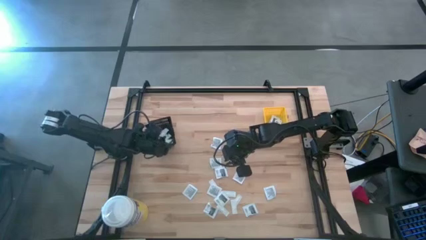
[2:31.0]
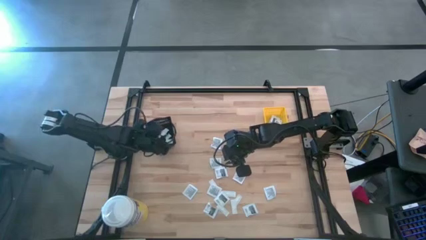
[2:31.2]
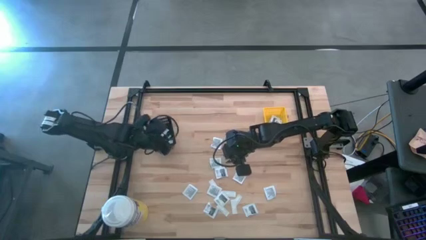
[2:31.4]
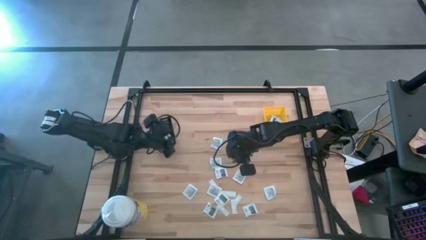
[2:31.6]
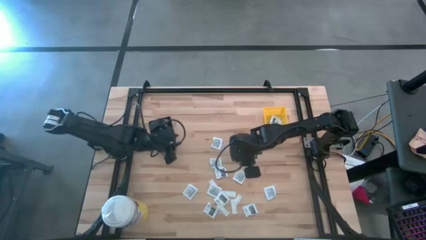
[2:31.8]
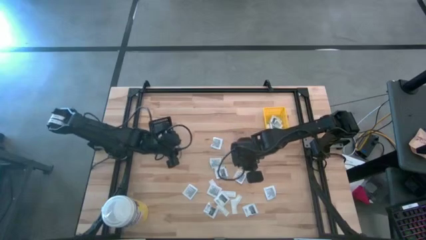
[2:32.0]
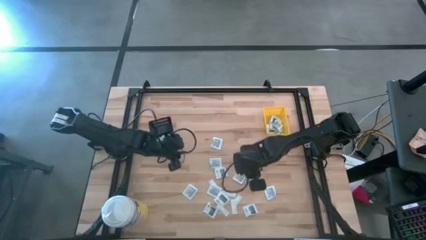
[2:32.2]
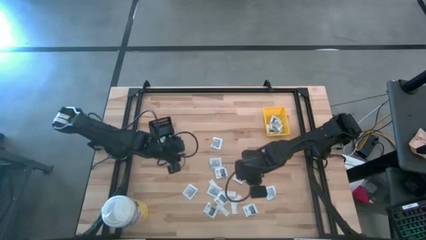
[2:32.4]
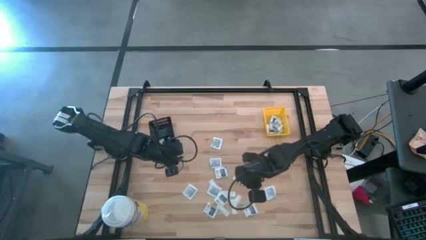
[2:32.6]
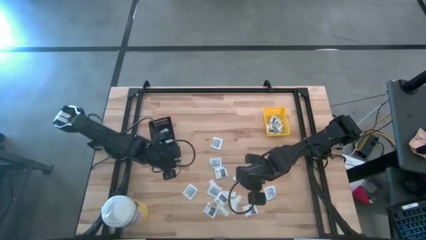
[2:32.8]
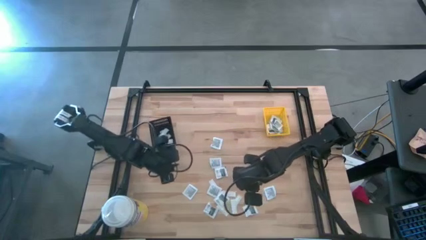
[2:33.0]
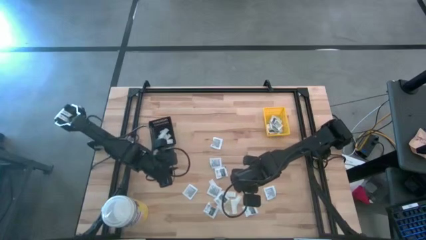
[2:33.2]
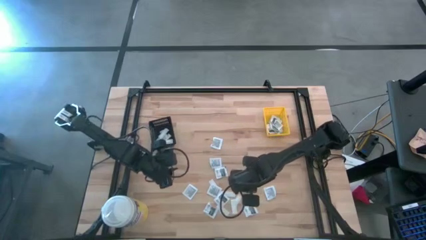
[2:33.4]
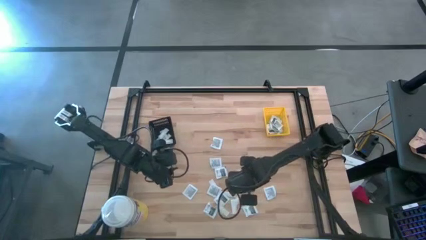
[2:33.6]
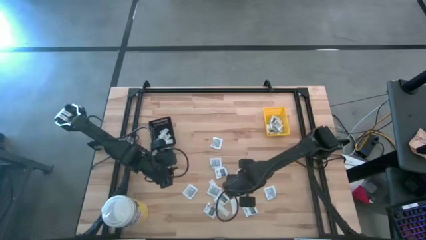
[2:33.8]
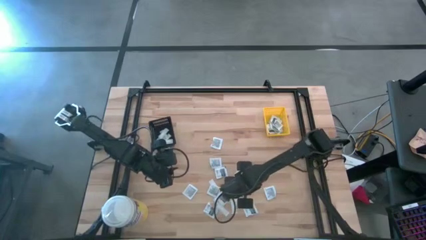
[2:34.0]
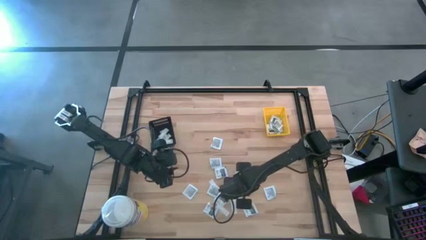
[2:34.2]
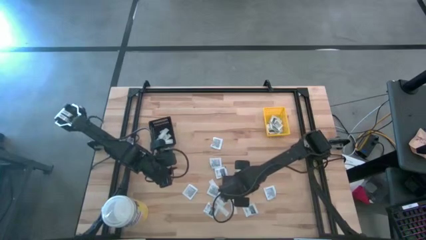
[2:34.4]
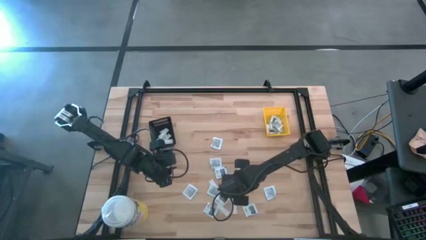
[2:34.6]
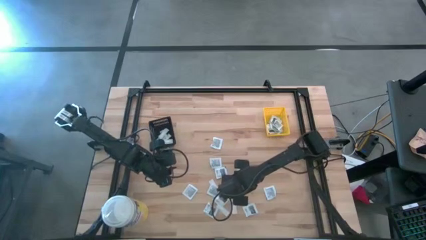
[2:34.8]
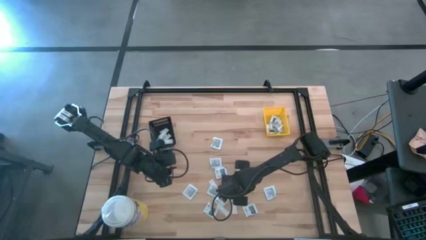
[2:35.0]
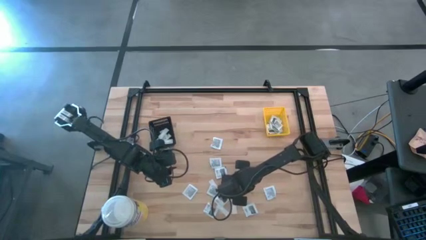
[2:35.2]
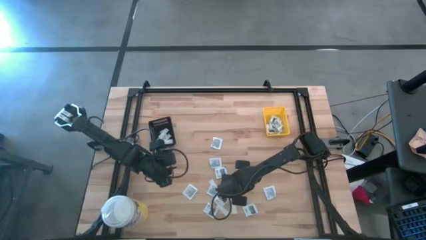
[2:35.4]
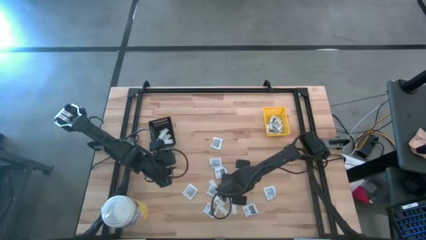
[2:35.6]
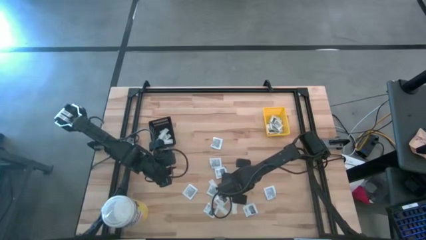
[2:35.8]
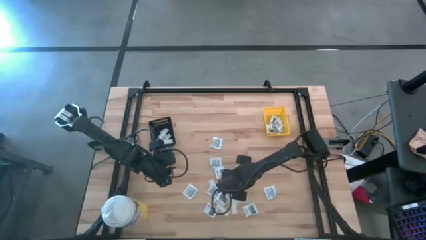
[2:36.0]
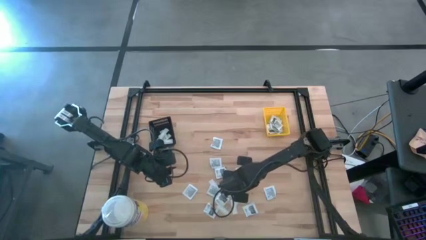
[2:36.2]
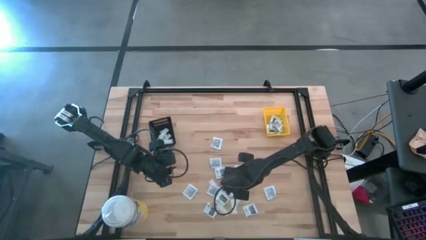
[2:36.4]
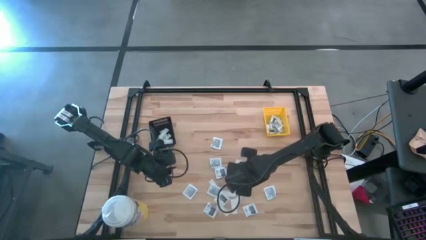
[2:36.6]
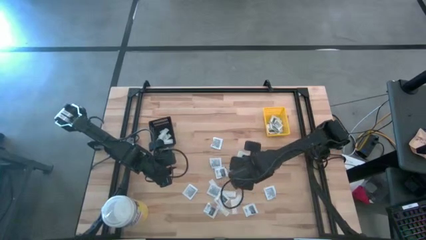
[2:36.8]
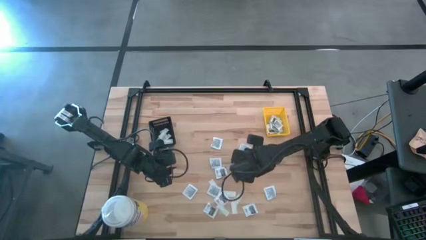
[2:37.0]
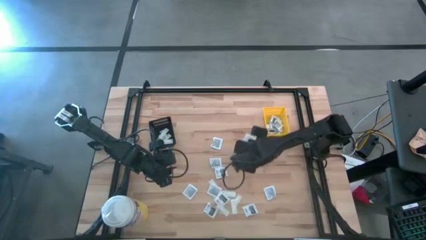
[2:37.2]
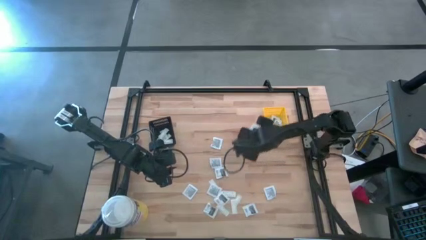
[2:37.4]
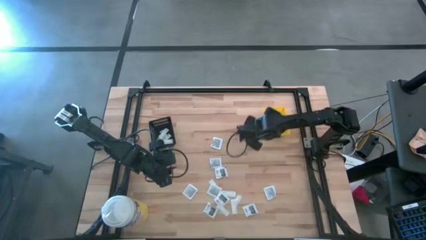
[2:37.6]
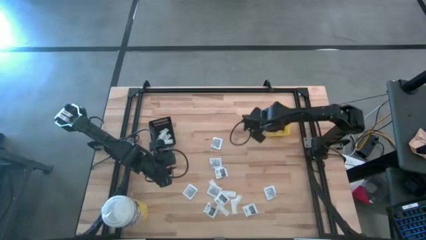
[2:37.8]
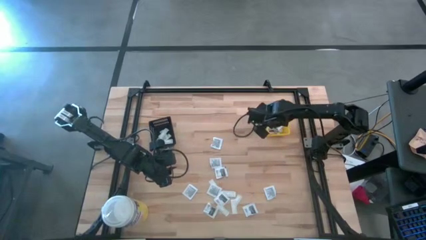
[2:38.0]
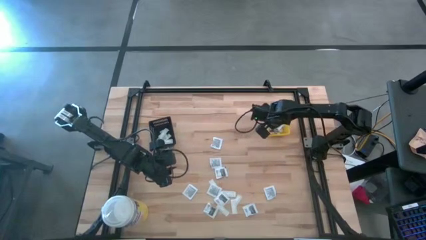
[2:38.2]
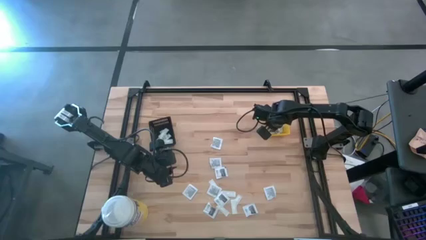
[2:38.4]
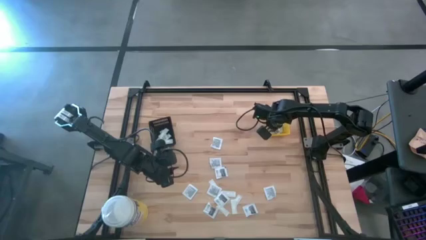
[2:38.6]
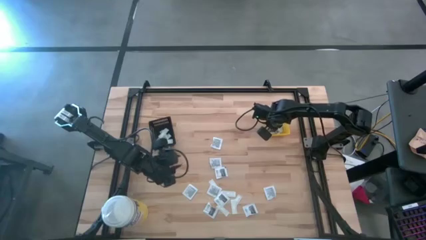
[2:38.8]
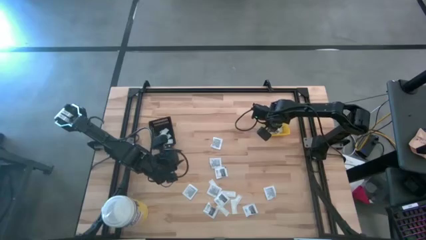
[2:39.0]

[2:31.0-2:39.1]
Task: Pick & Place First Aid Supplies
Put the black pad into the yellow bin

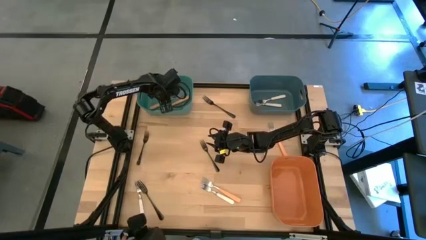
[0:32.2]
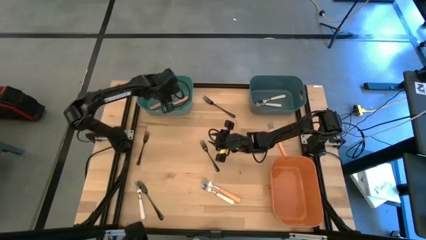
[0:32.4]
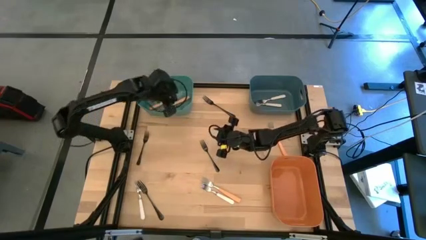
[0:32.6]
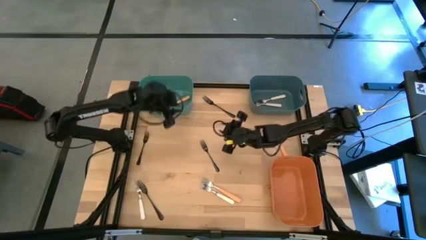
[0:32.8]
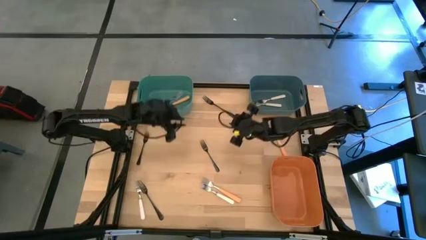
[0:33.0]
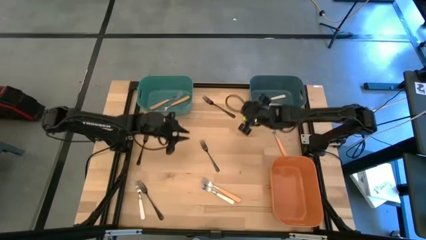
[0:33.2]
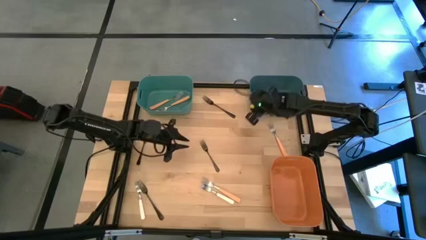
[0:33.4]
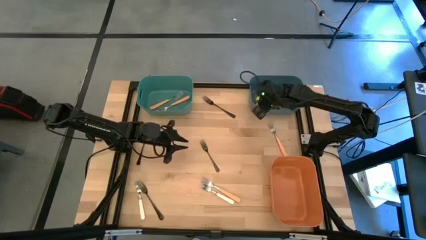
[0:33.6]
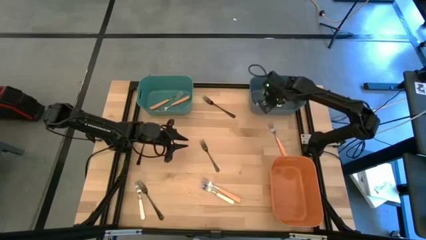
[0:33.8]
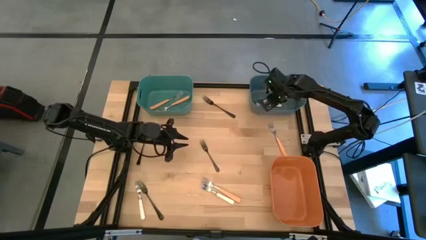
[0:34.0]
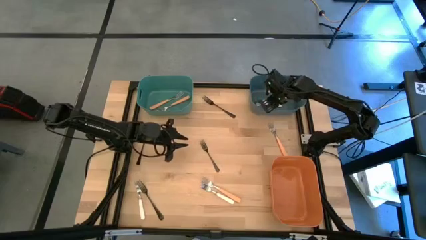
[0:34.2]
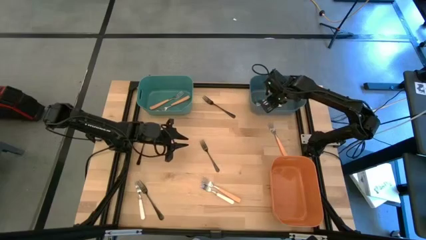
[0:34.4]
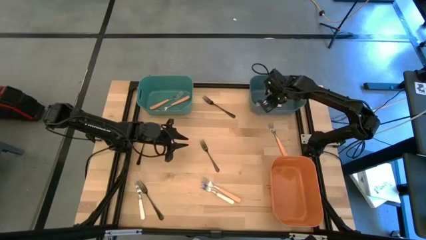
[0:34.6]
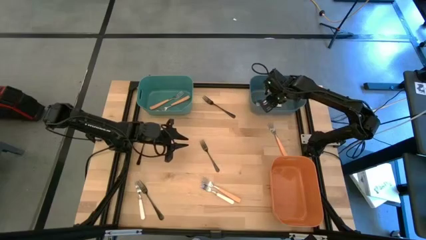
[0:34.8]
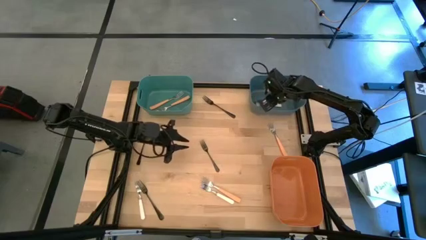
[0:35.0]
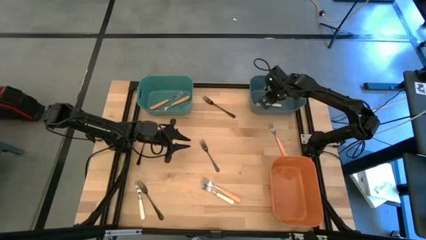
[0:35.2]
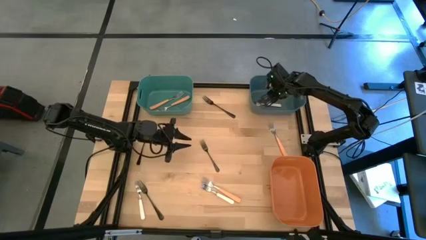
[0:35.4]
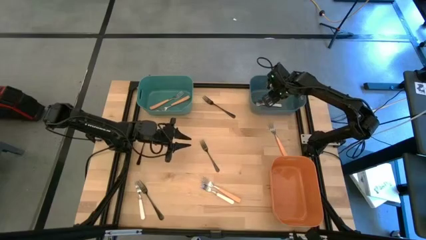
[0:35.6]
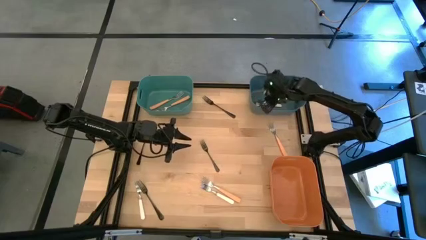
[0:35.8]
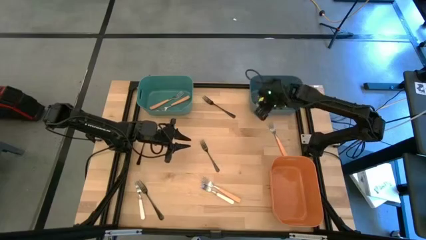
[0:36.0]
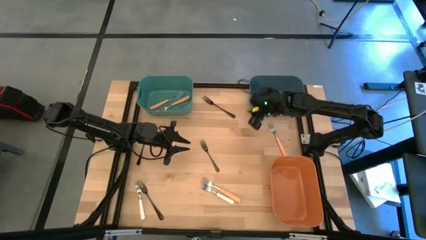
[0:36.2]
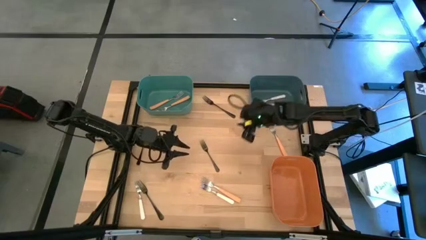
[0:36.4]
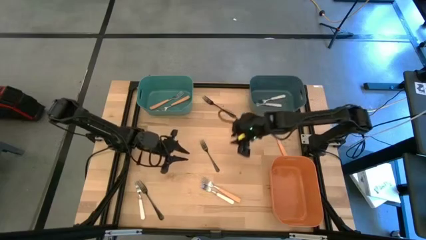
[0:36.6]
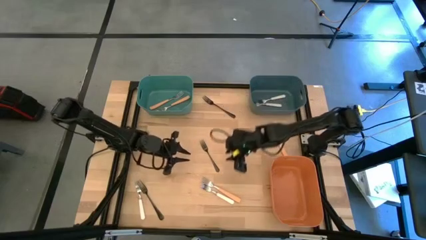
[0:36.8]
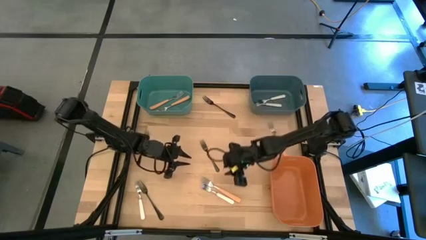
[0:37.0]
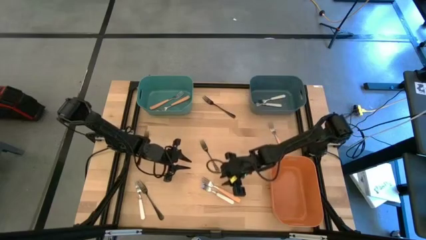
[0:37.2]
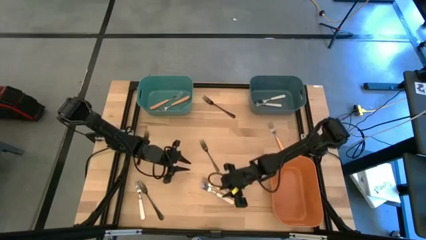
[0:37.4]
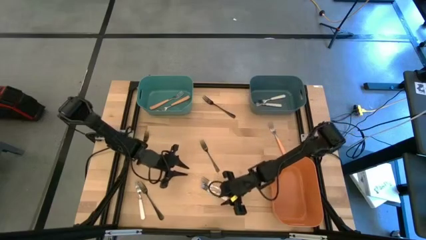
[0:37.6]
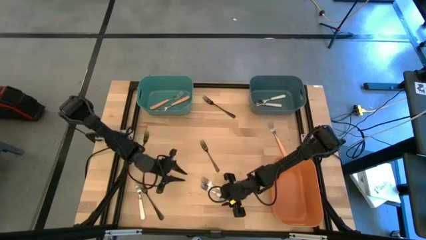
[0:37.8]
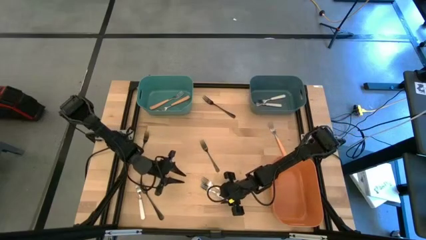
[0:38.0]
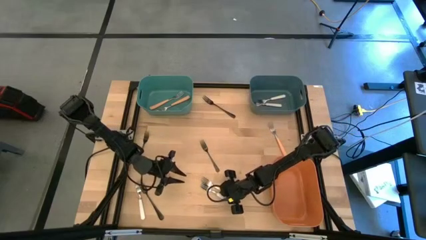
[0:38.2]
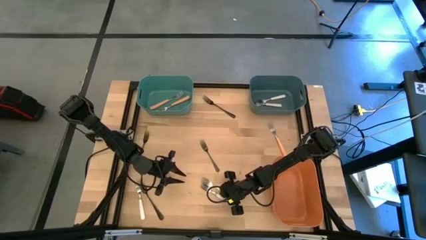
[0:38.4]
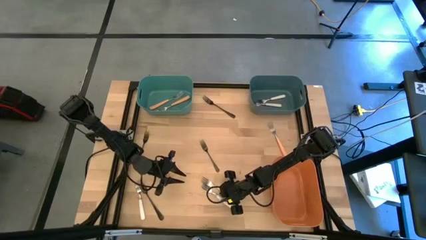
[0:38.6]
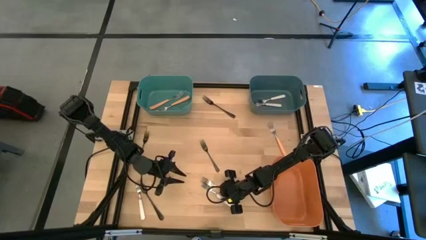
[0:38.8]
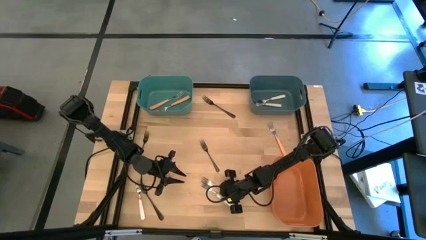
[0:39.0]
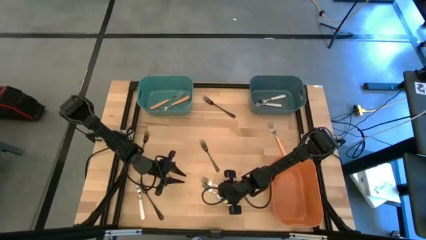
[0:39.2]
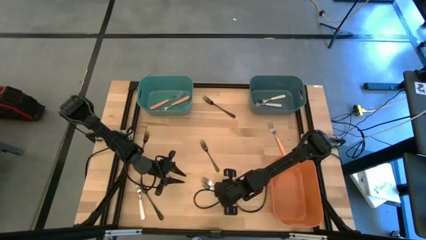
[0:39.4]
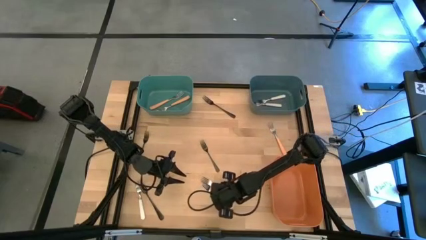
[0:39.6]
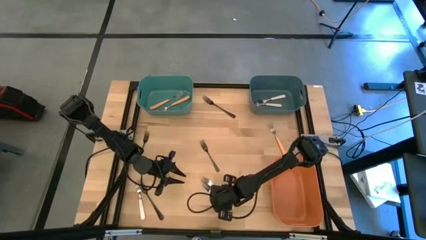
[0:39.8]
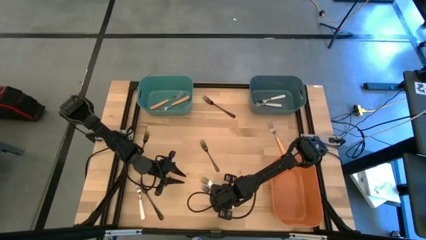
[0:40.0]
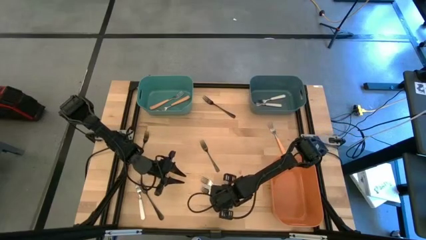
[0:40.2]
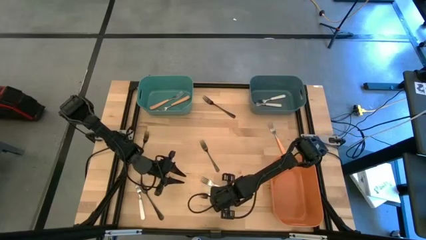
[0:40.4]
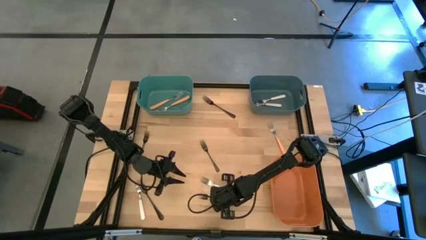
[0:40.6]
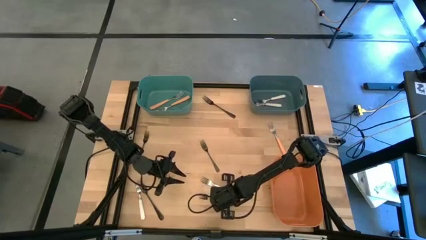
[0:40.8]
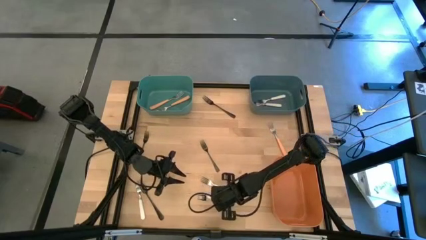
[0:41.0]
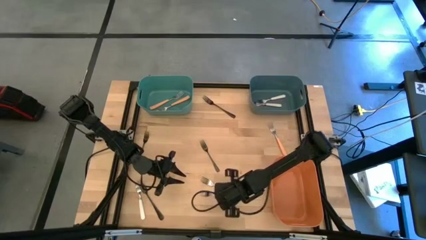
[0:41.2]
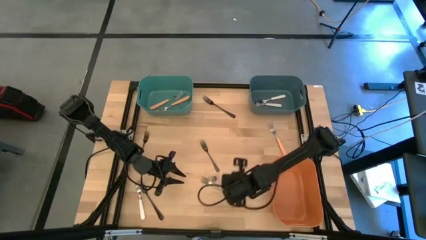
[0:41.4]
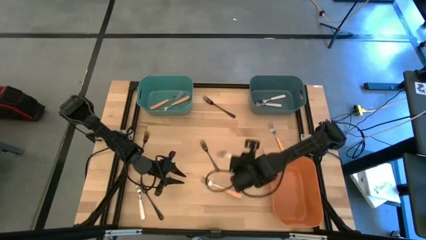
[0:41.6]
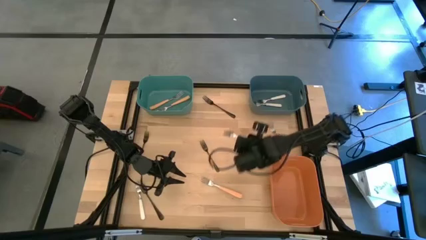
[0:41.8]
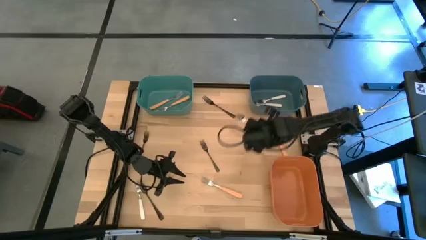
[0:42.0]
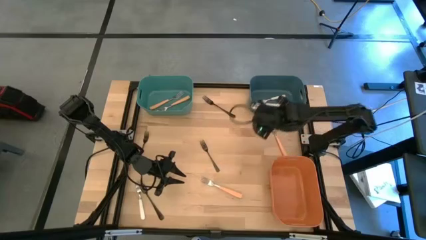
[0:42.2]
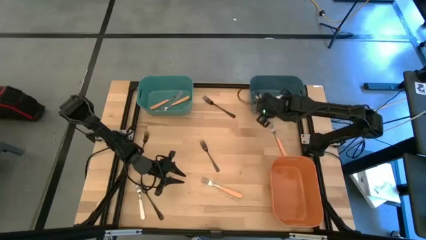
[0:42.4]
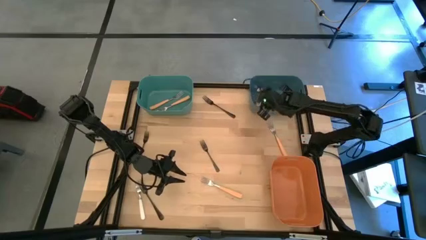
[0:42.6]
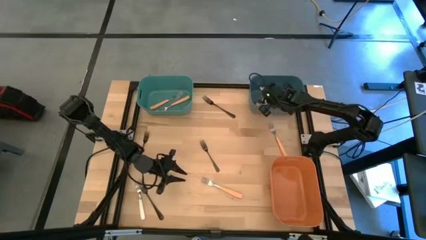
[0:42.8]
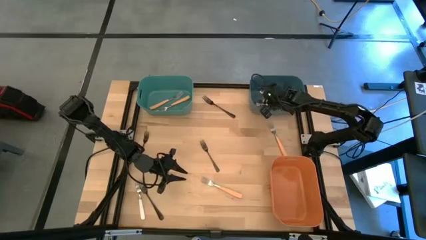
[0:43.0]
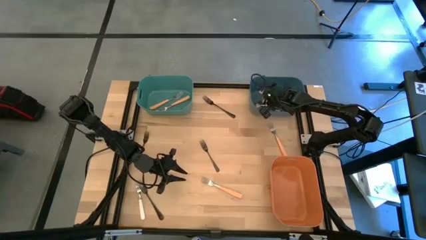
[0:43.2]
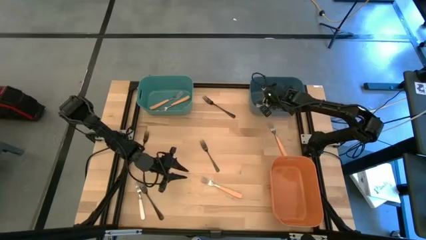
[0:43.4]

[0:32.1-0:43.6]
Task: Sort silverware by color (type)
Put the white fork into the blue bin
